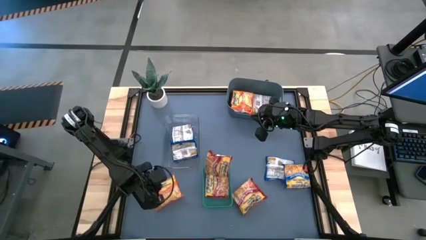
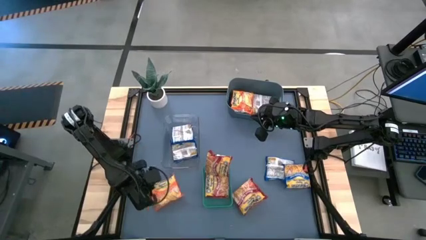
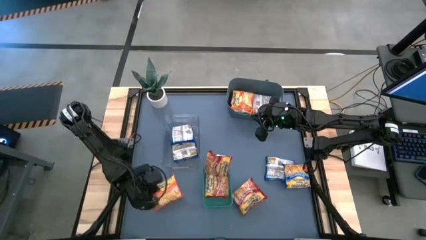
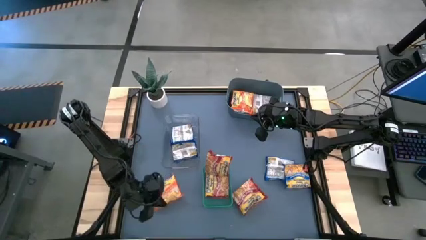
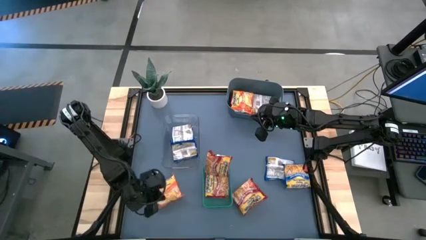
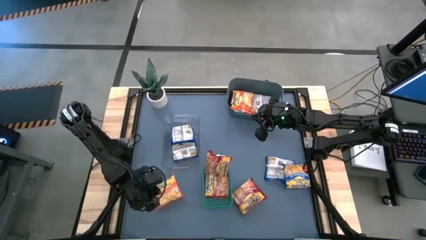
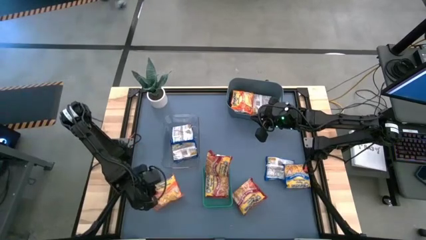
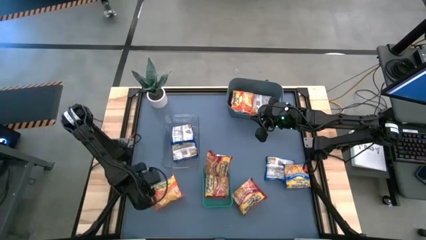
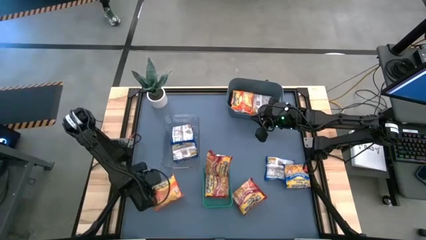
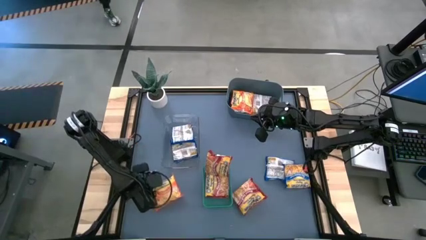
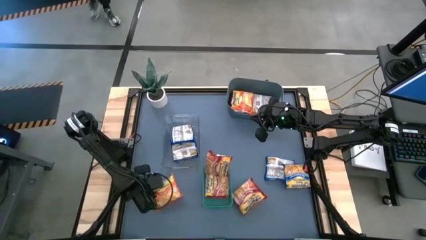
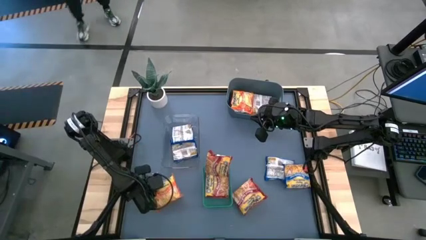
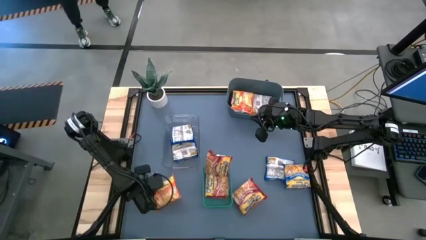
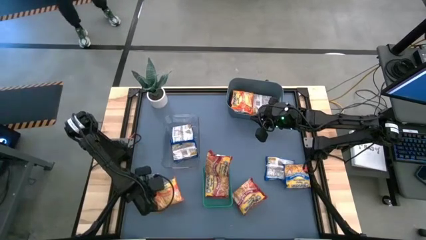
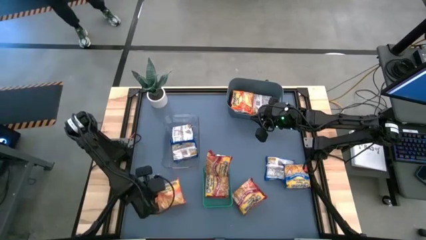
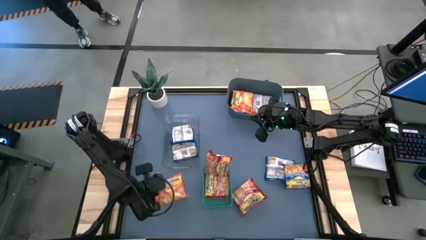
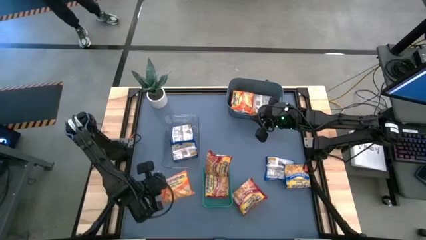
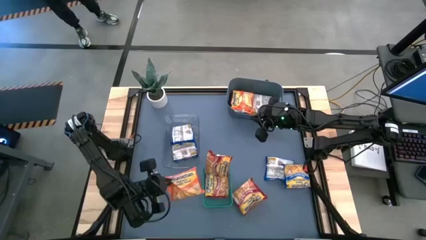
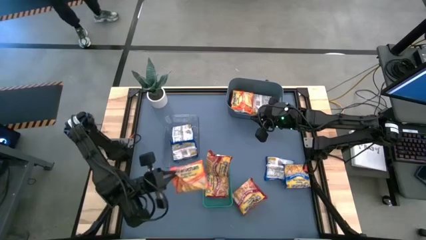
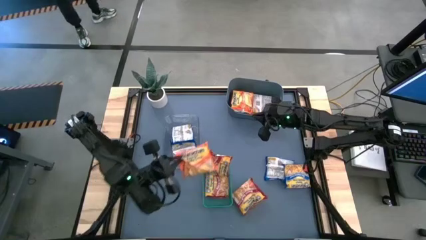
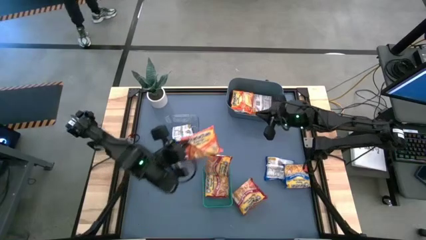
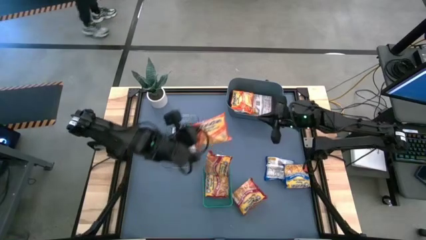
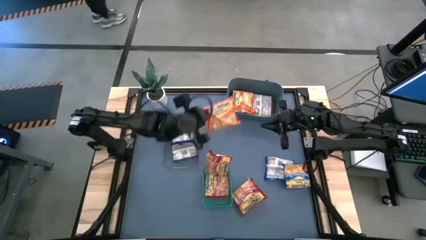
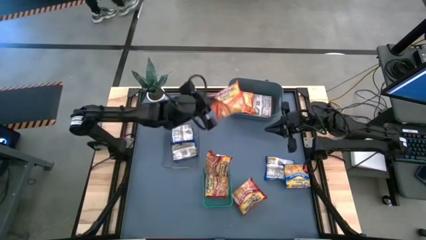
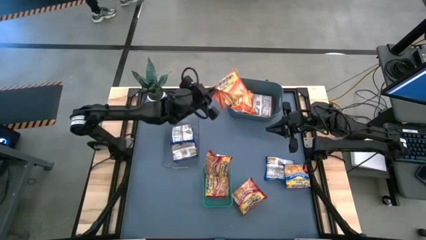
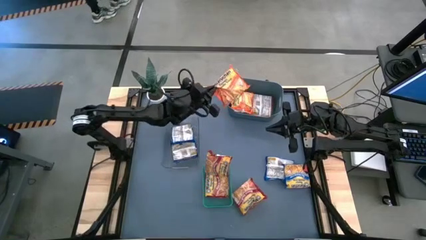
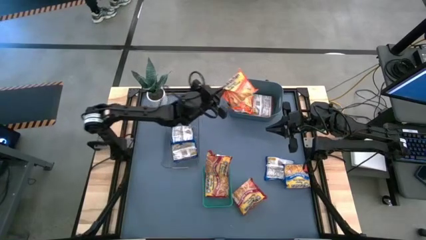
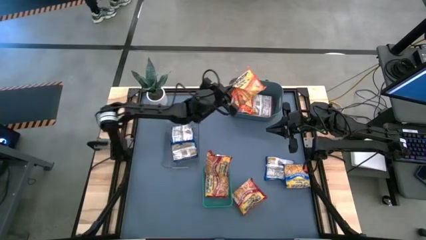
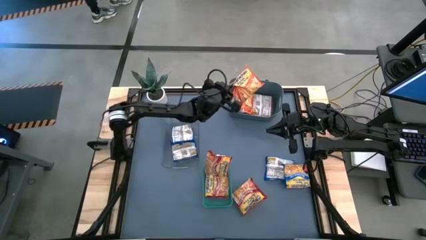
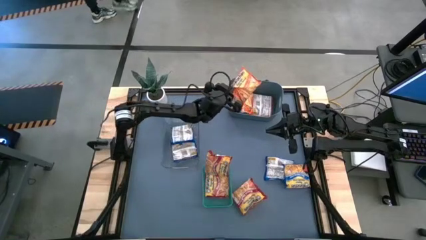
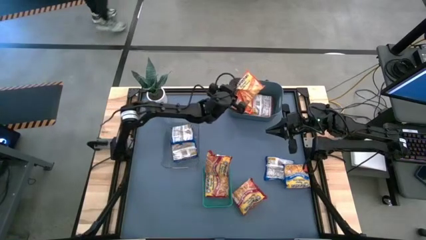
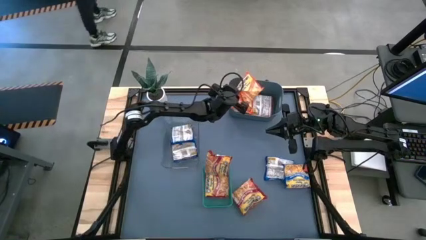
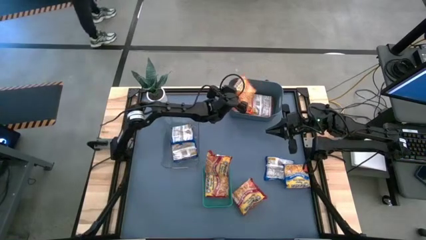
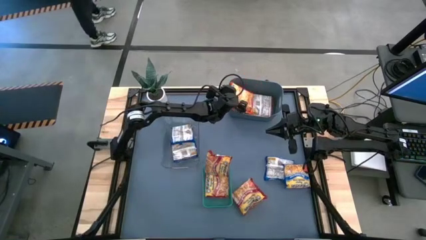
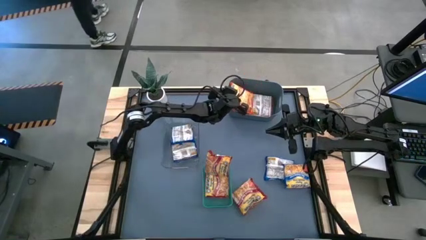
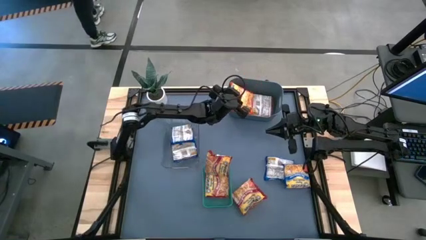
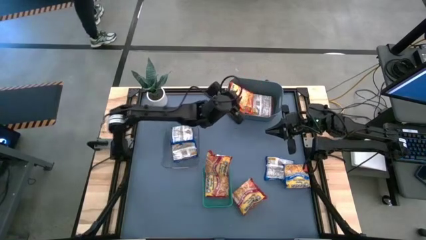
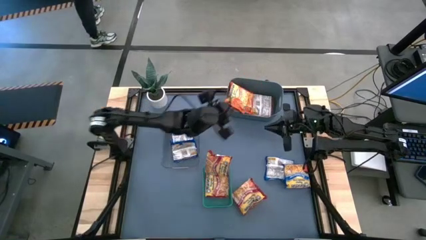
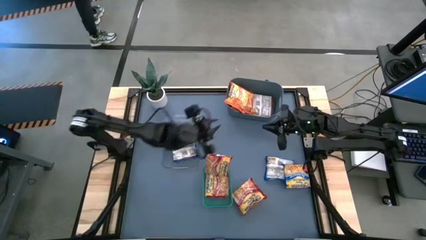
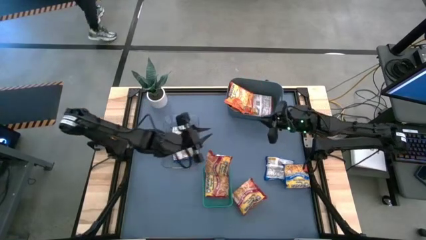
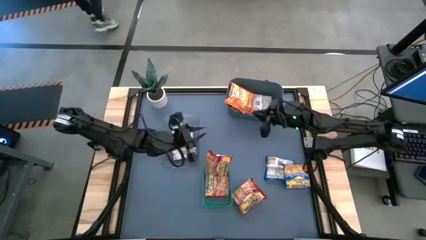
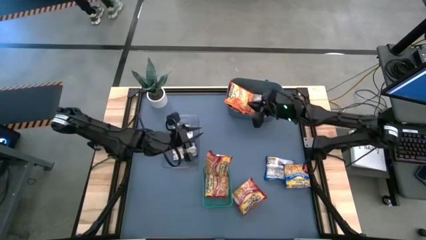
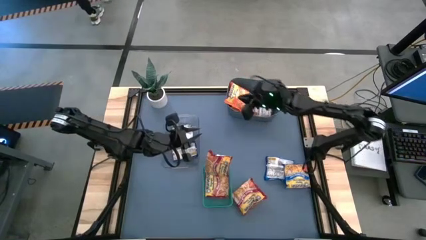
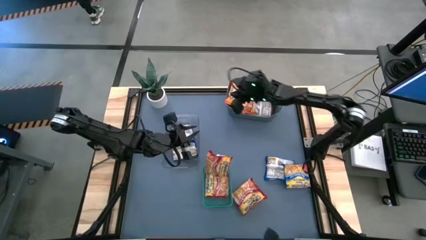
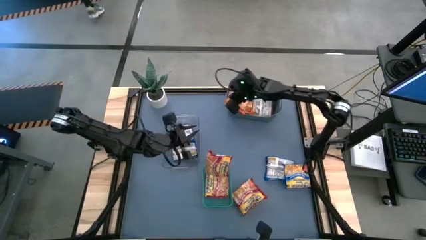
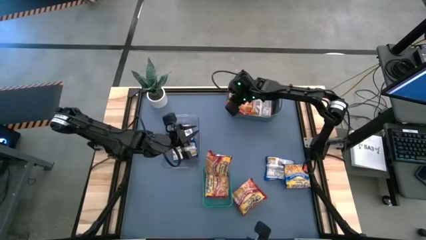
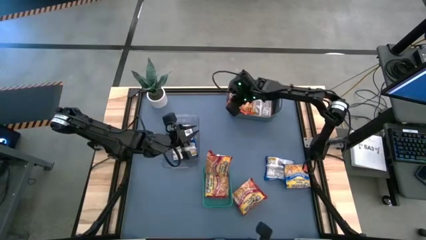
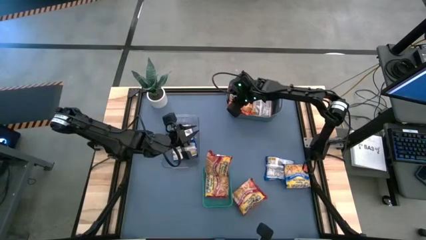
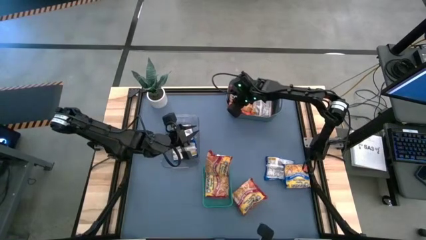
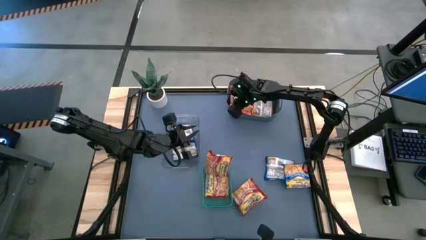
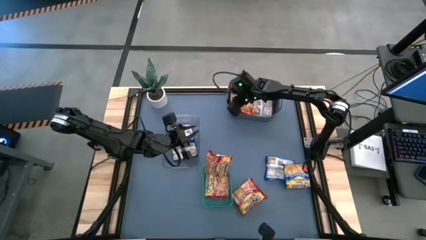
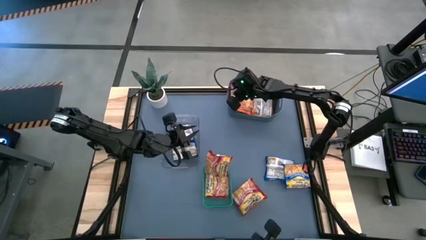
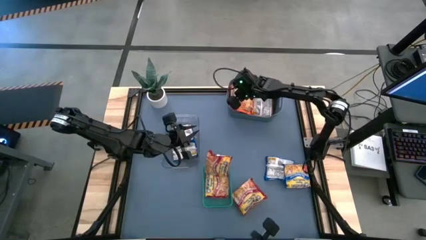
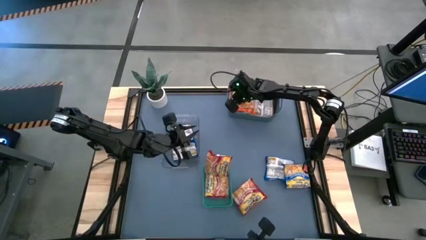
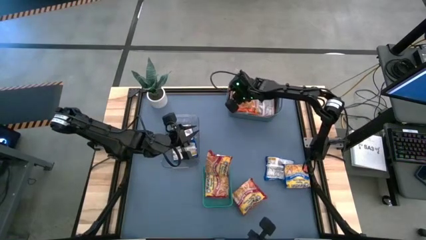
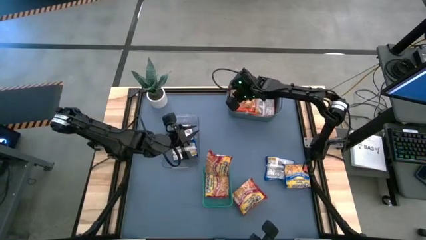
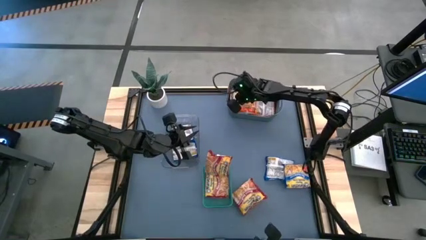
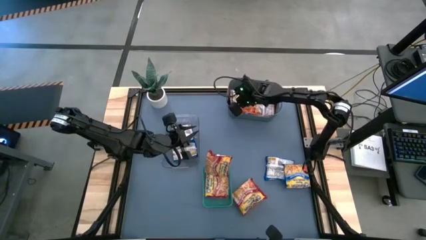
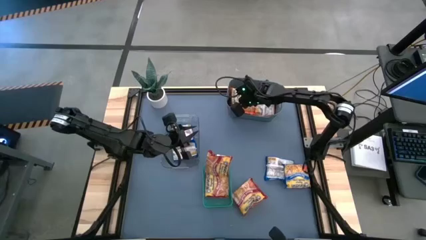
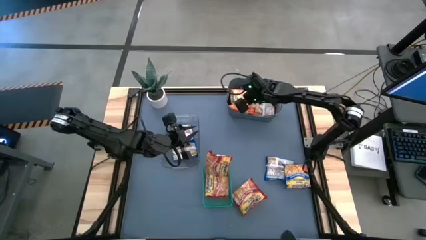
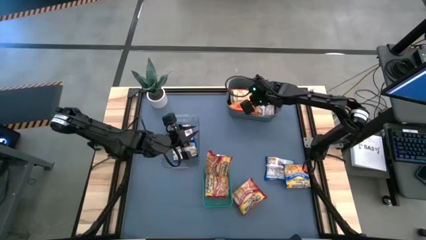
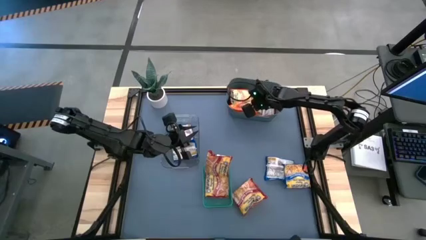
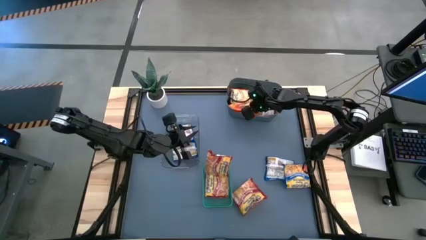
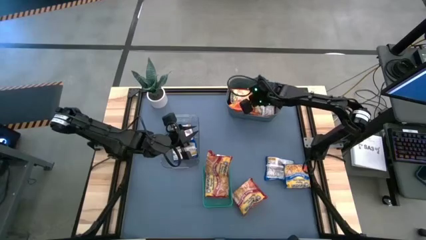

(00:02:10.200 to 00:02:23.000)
Task: Sort Maruchan noodles
Put the orange noodle pack into the dark blue bin

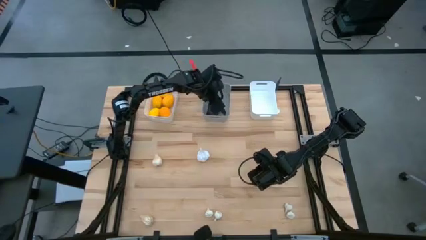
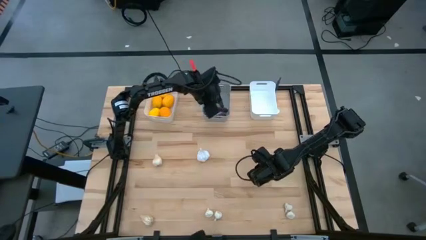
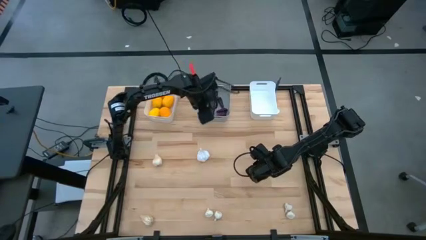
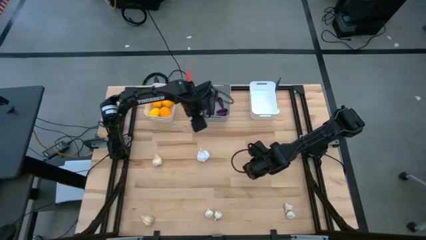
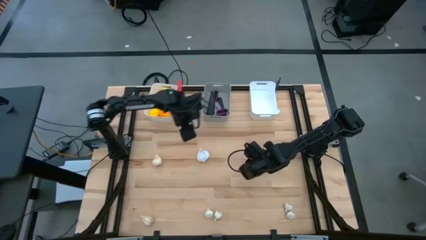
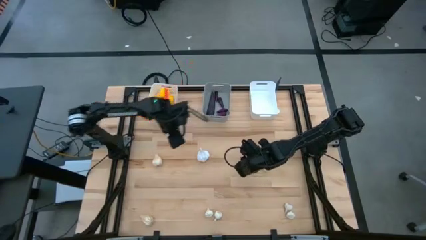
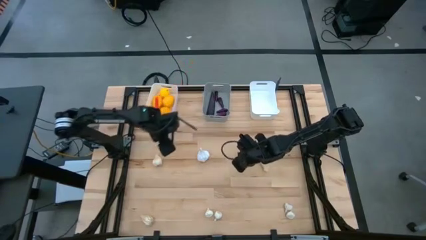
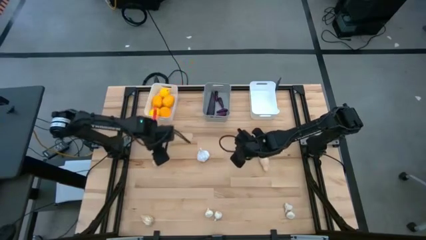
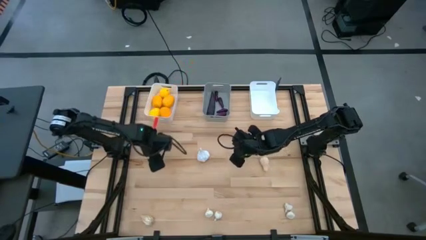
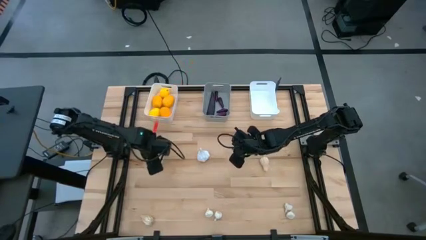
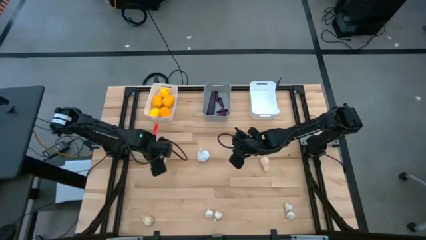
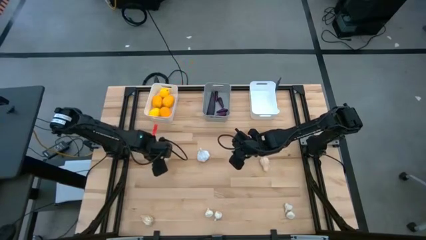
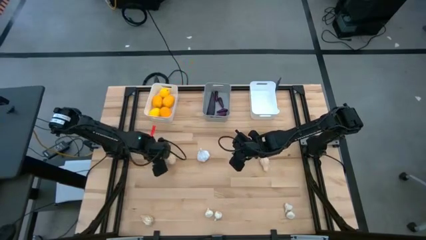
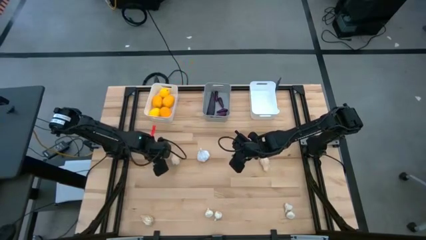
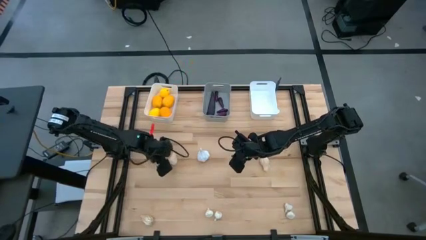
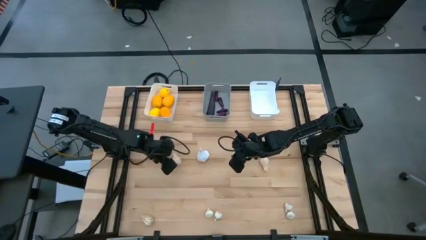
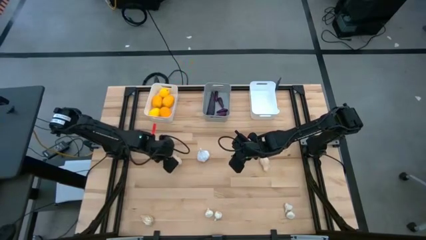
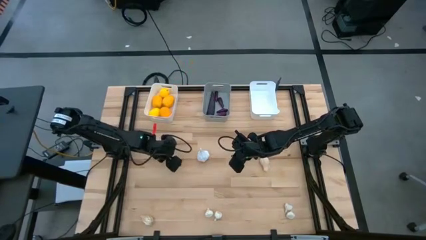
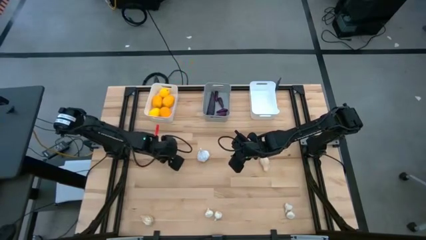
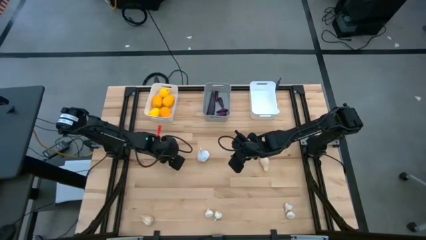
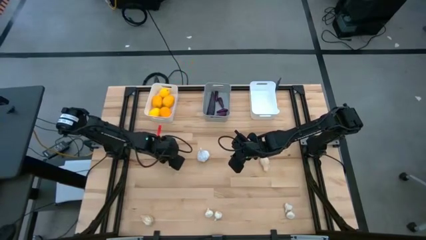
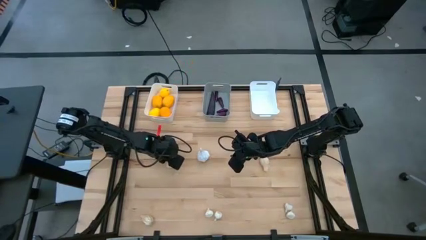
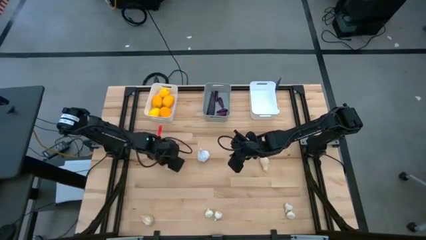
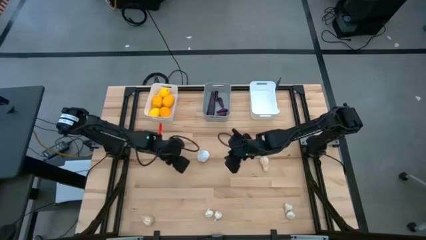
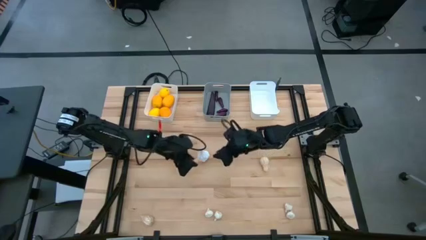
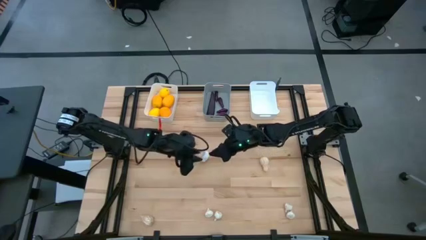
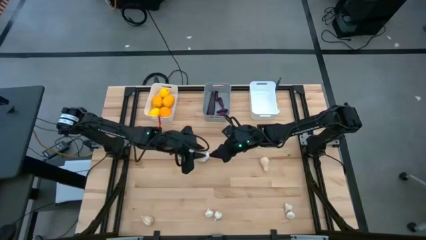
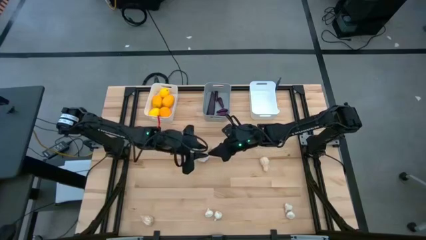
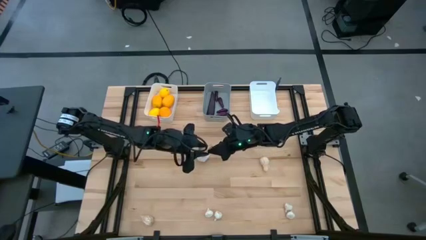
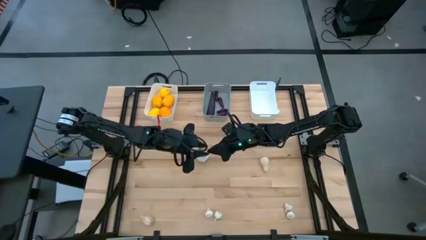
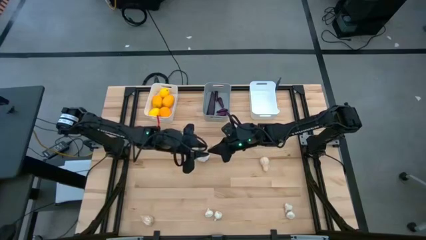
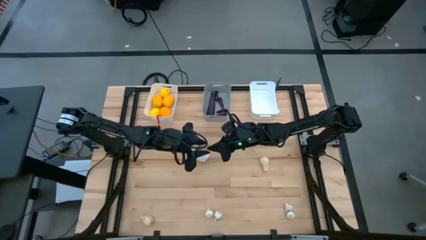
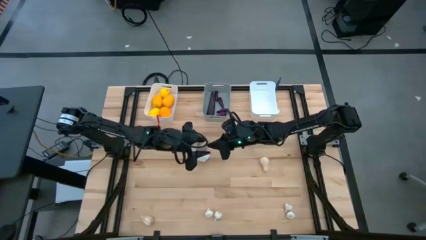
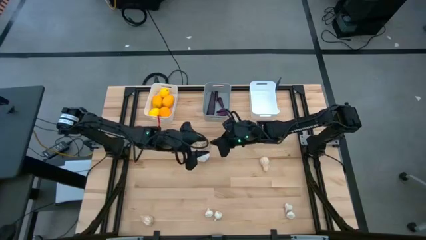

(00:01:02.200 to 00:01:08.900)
Task: Sort produce into baskets
Put the garlic into the right white bin
